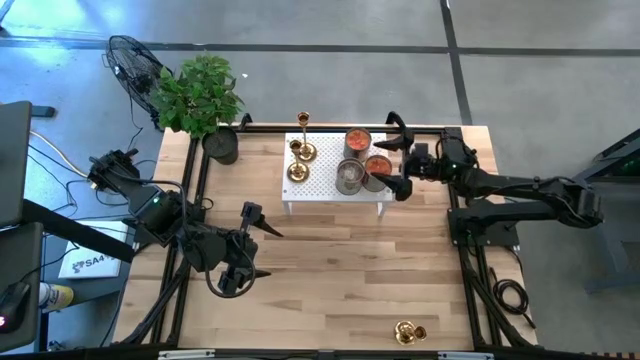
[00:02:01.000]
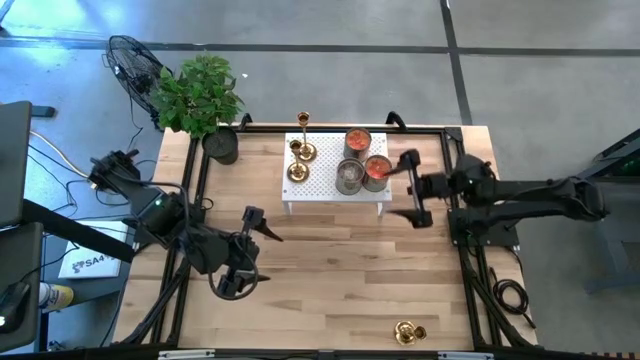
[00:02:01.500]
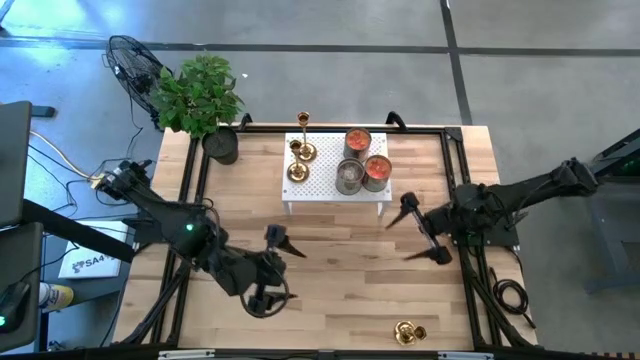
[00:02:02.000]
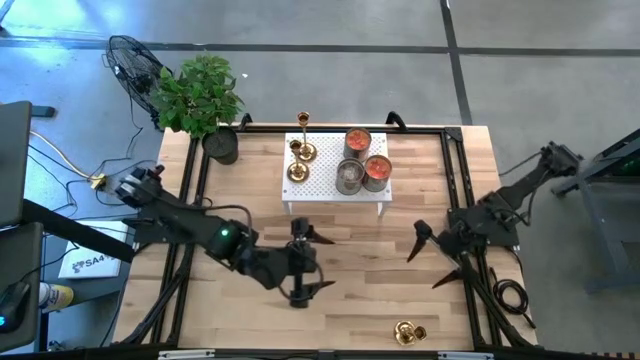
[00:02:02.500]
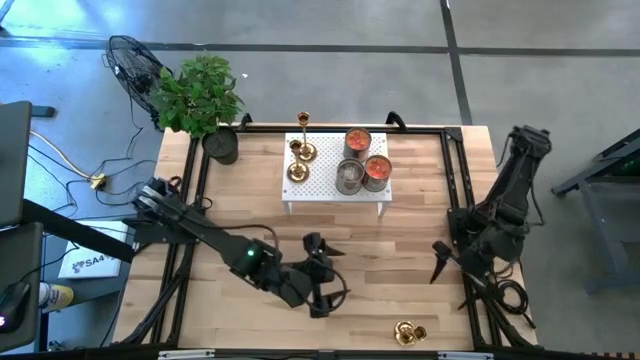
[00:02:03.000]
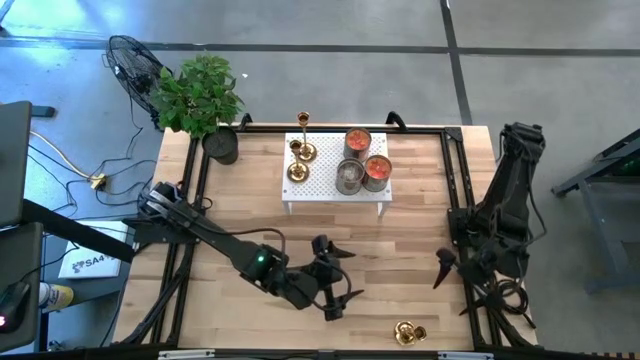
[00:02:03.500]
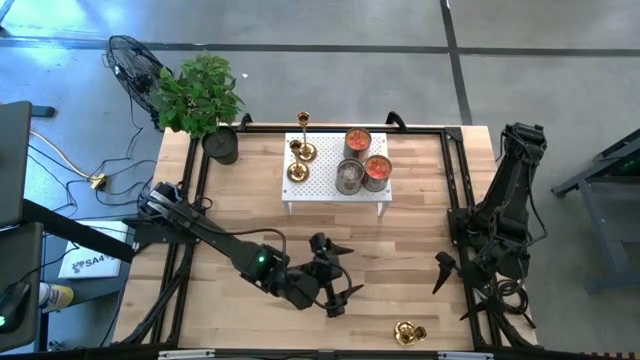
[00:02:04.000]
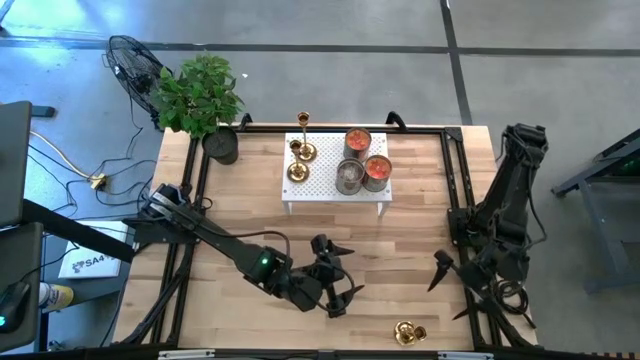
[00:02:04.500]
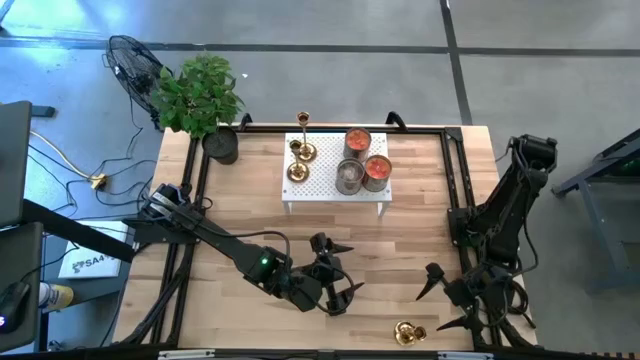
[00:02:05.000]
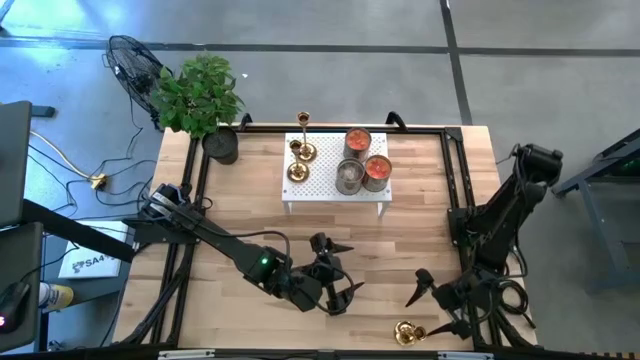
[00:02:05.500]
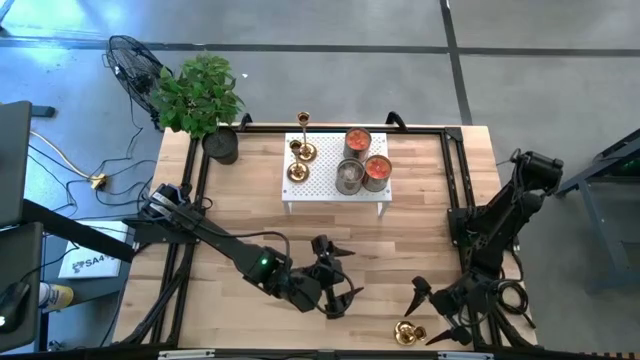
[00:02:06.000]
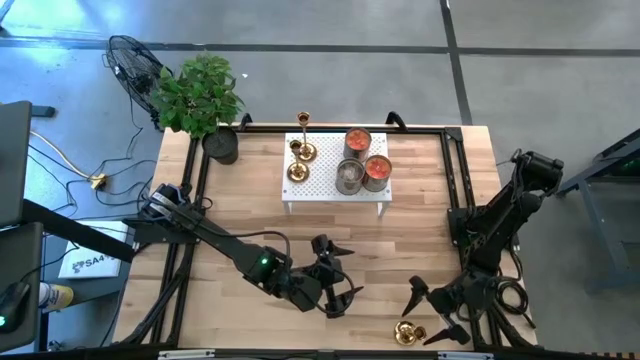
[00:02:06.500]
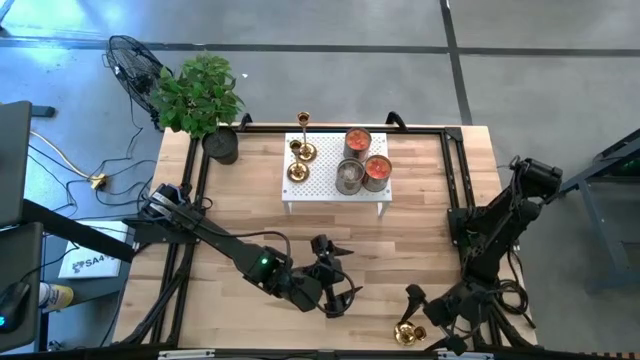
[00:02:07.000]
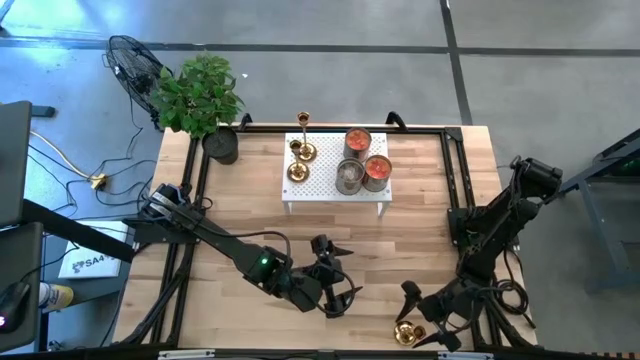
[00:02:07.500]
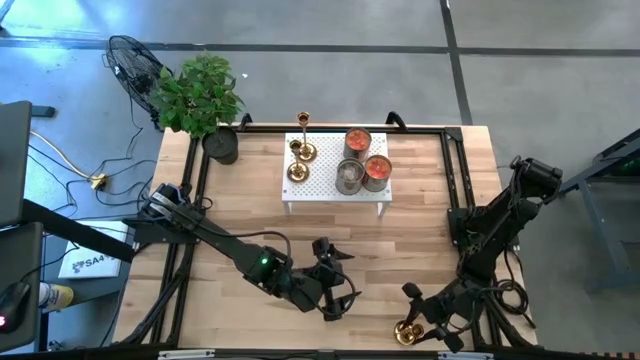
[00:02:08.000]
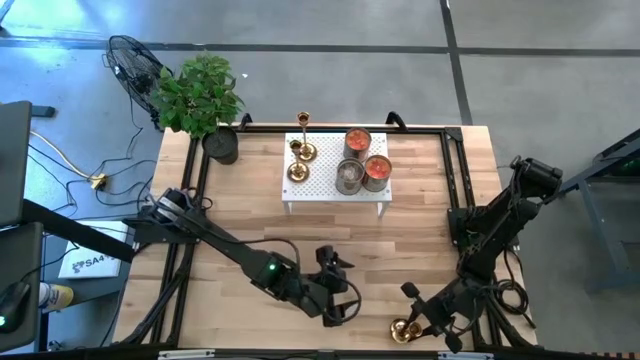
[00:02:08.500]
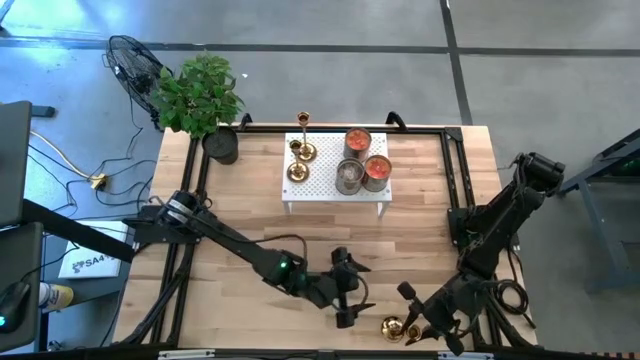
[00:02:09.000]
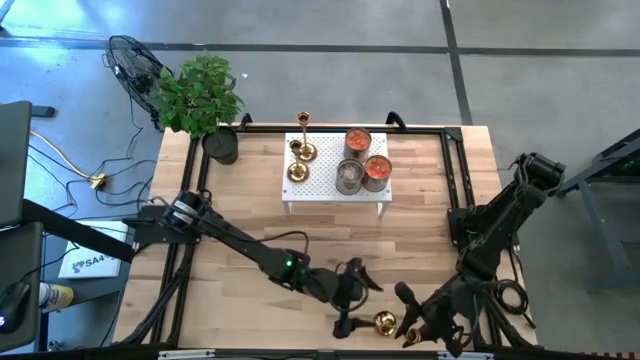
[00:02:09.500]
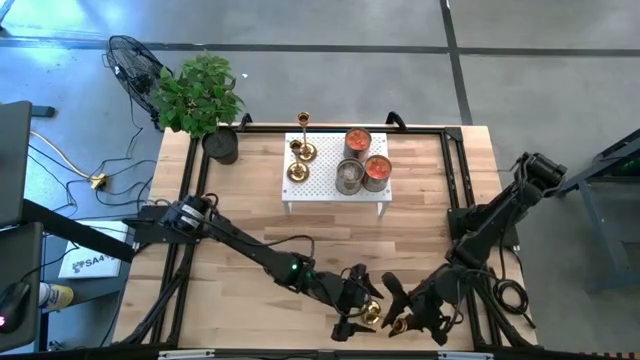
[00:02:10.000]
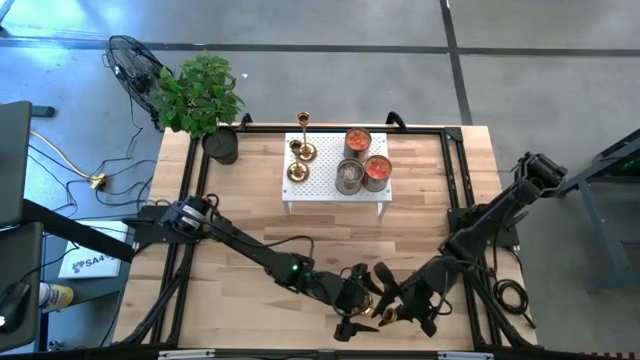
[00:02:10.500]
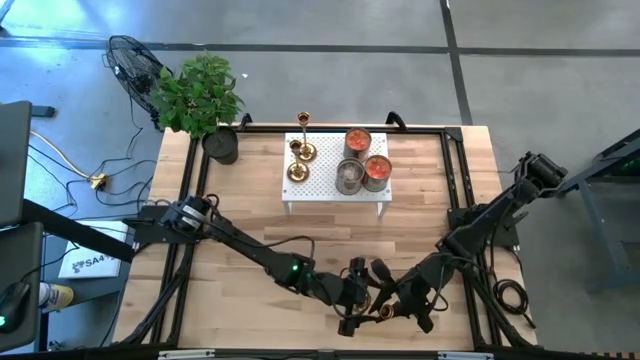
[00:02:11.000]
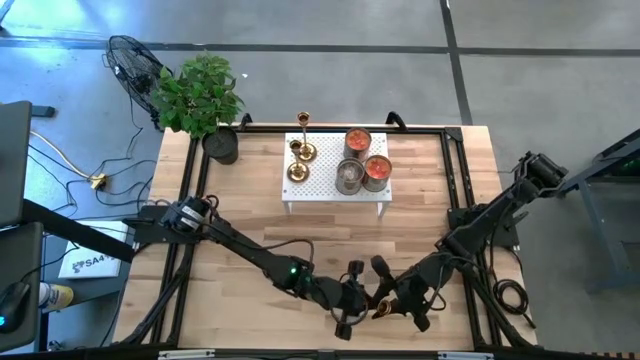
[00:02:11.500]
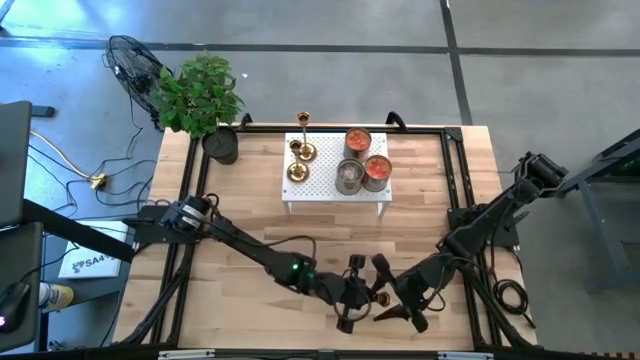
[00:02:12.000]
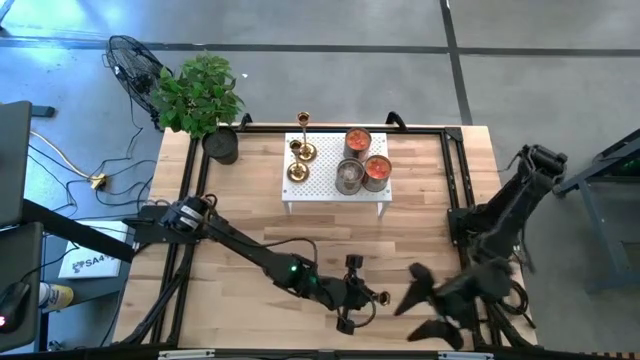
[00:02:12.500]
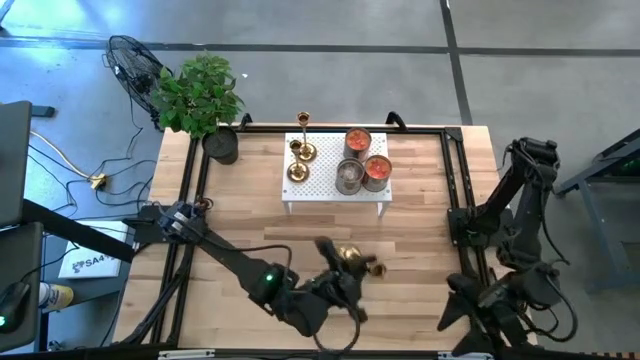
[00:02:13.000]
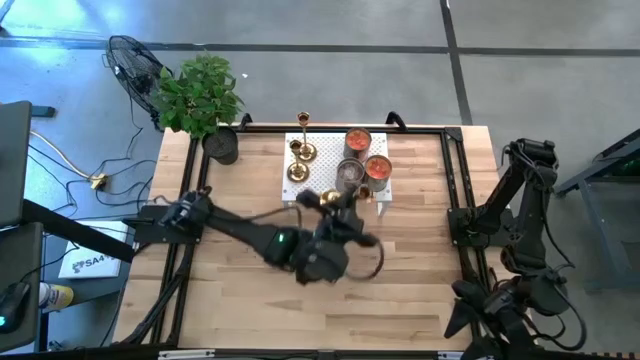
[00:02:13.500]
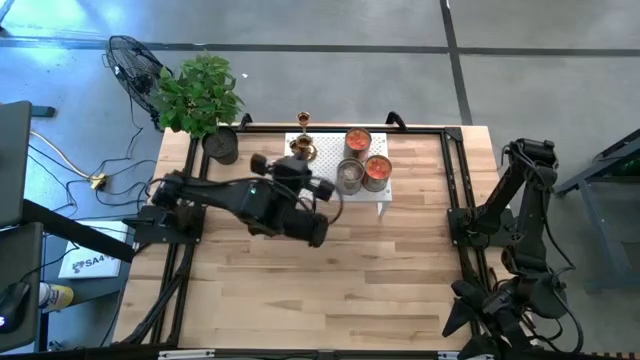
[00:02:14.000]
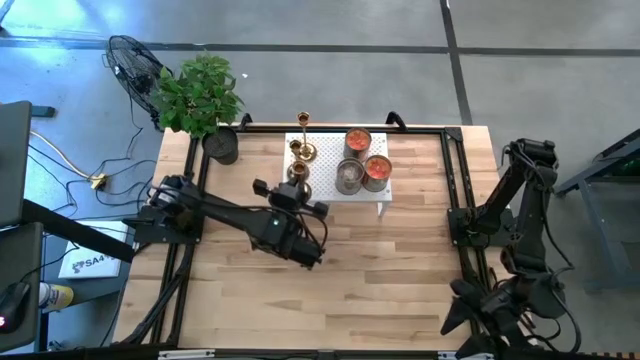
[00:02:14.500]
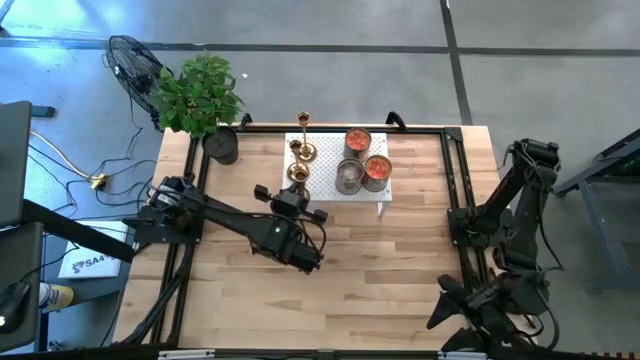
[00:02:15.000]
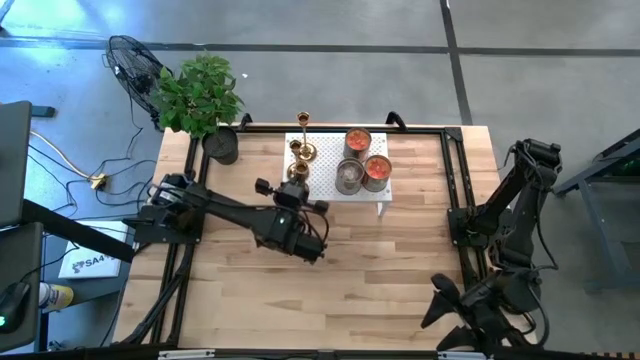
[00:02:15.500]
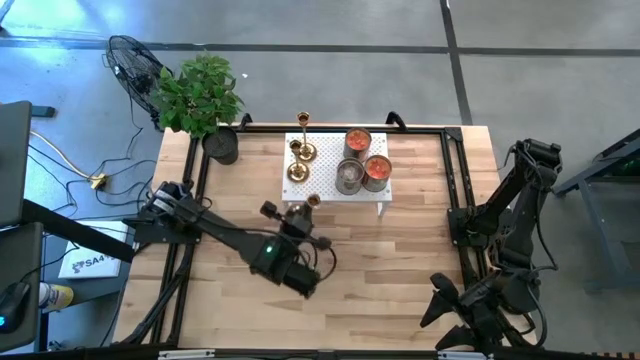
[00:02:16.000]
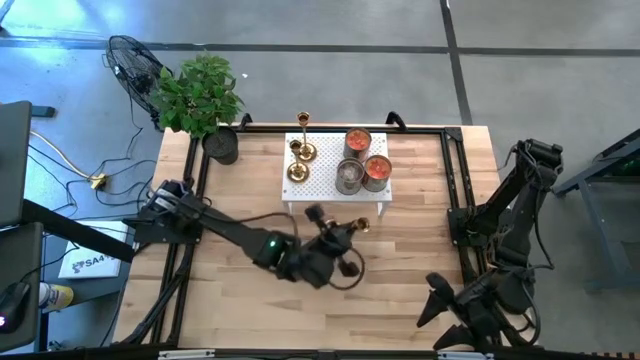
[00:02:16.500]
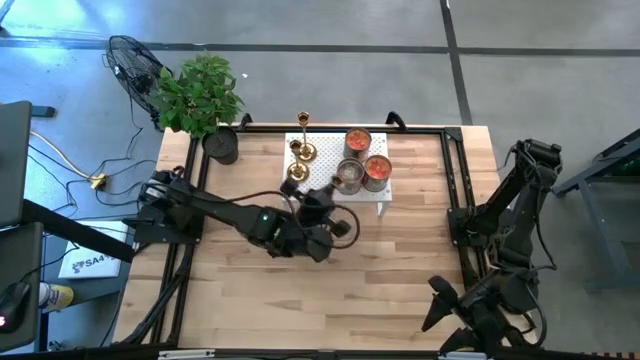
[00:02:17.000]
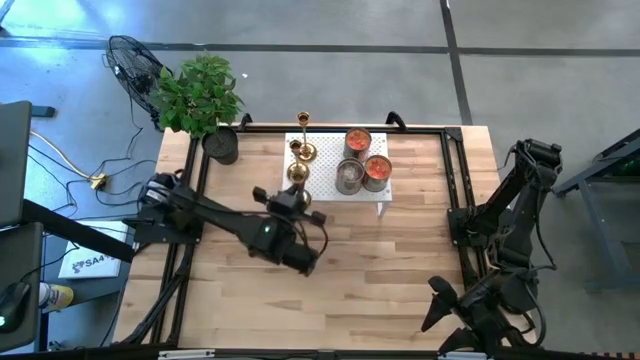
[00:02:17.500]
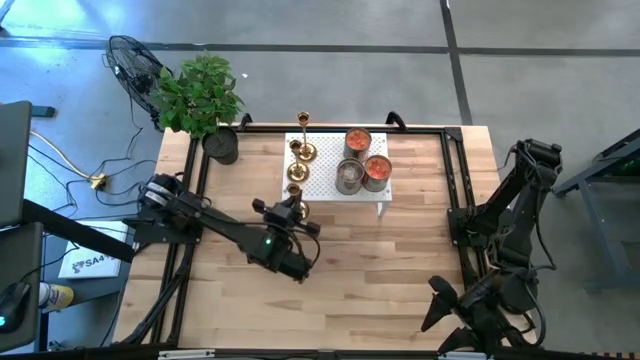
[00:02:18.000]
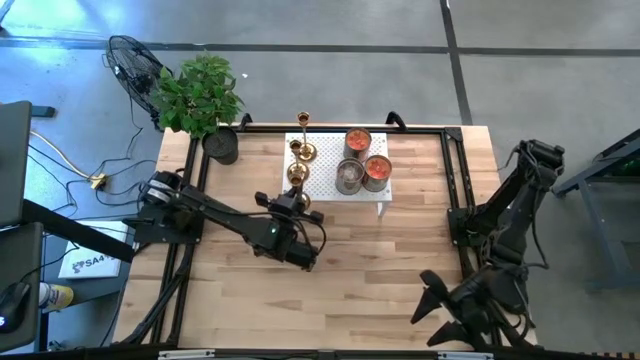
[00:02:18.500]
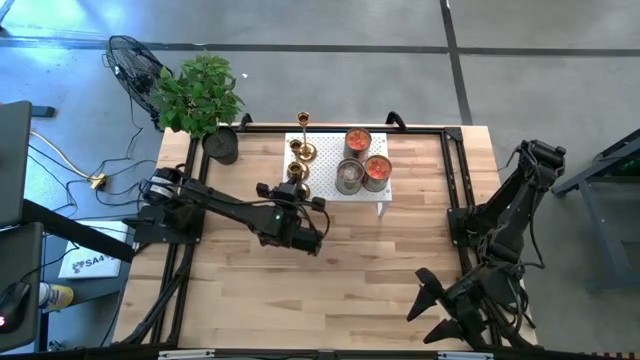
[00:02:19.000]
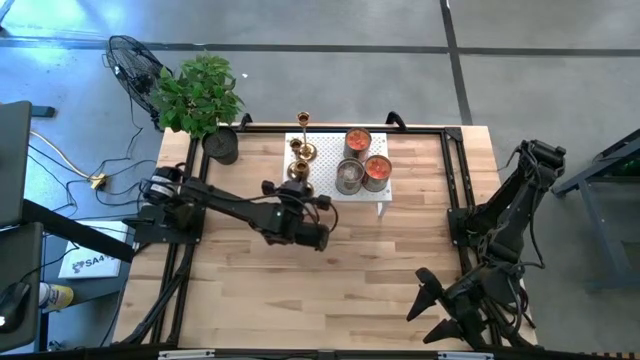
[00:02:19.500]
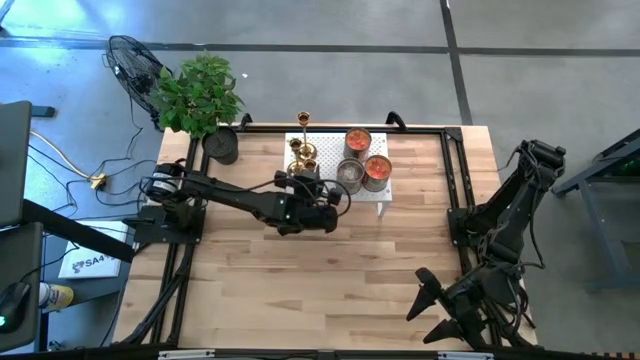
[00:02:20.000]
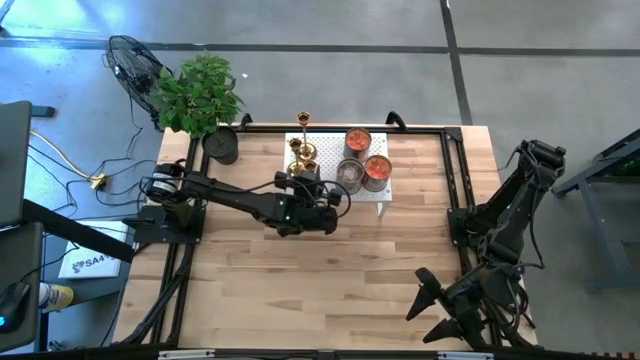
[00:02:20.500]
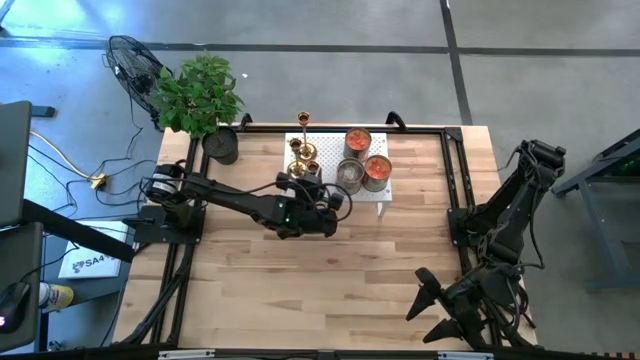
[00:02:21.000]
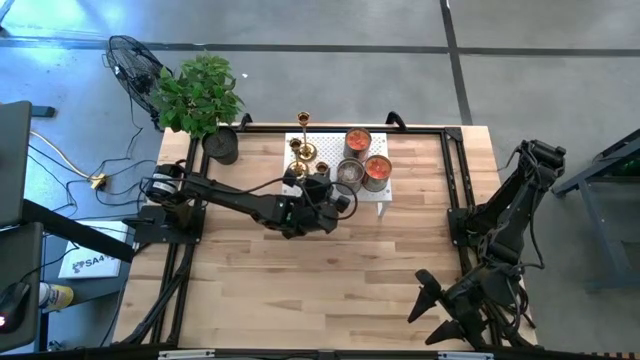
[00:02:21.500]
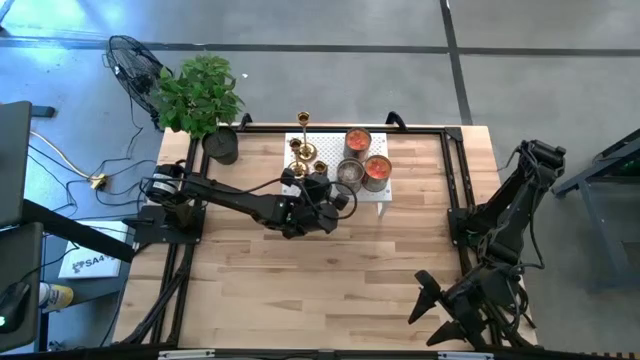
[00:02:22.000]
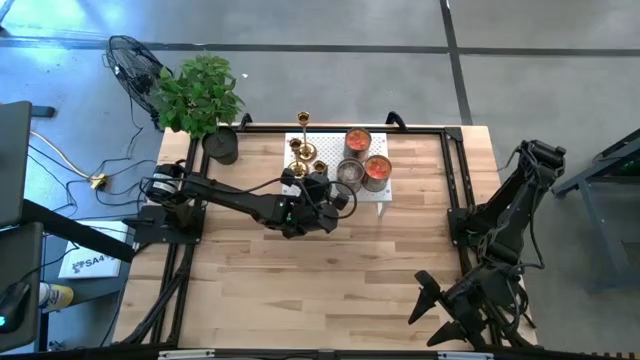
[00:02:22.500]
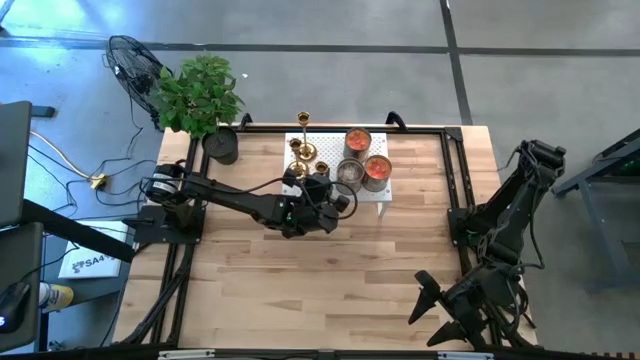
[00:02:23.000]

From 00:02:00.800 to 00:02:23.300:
Task: Pick & Place candle stick holders
Put the gold holder on the shelf
